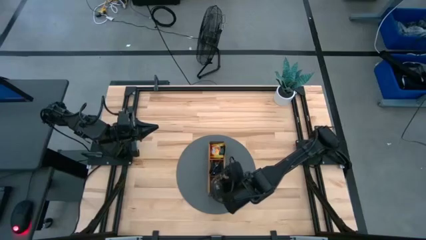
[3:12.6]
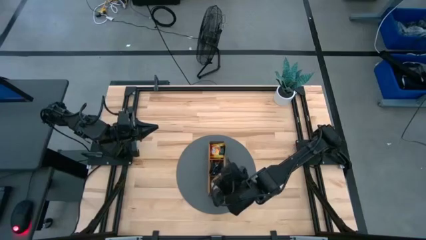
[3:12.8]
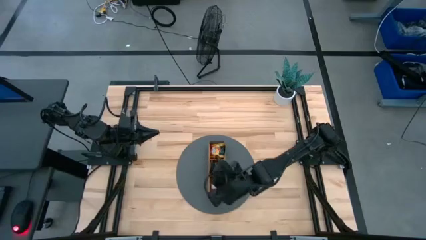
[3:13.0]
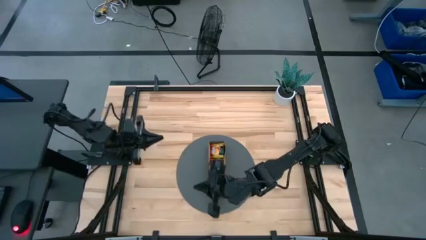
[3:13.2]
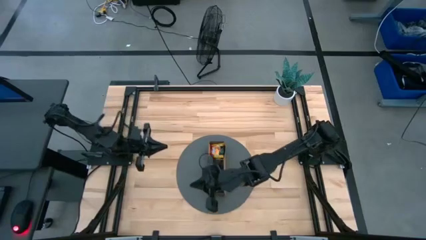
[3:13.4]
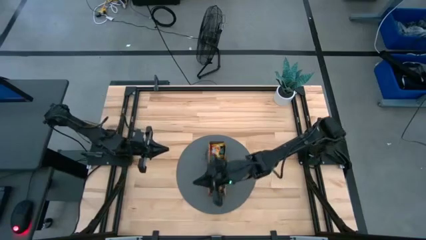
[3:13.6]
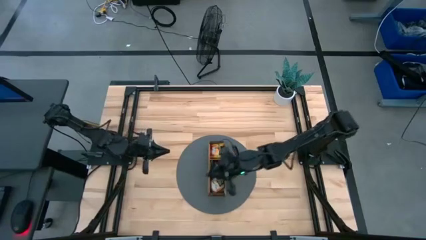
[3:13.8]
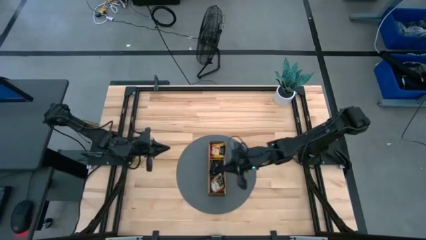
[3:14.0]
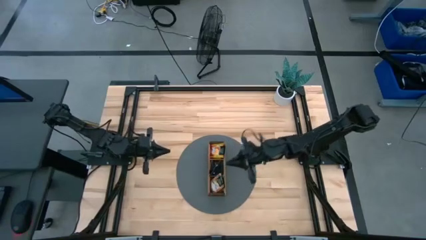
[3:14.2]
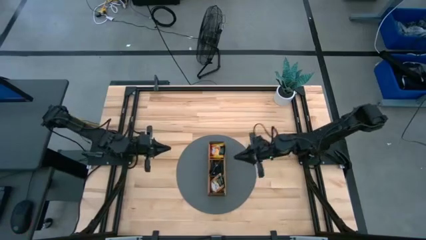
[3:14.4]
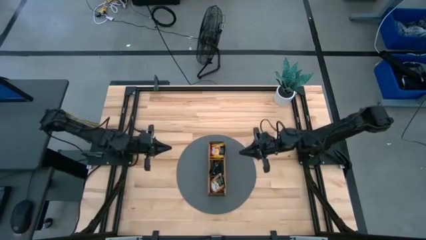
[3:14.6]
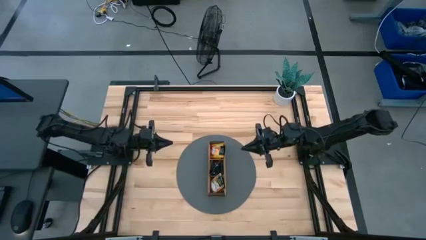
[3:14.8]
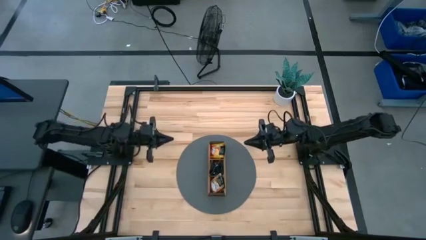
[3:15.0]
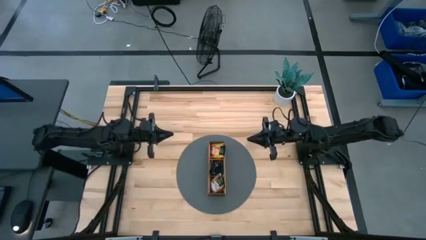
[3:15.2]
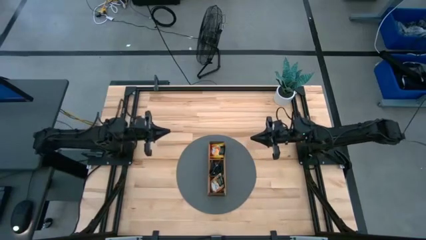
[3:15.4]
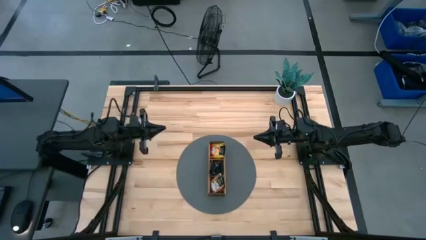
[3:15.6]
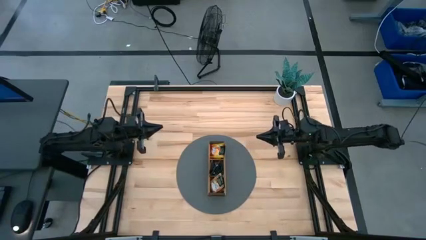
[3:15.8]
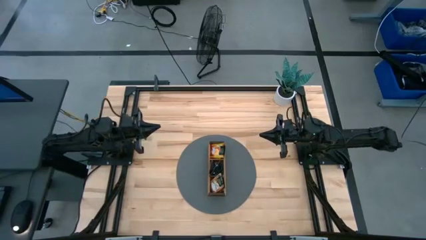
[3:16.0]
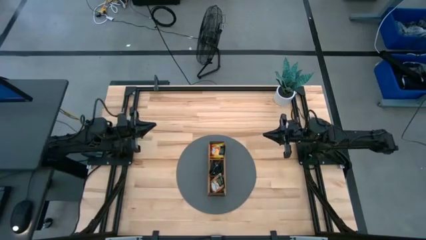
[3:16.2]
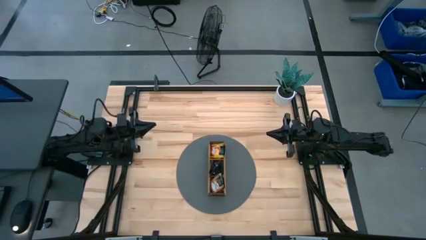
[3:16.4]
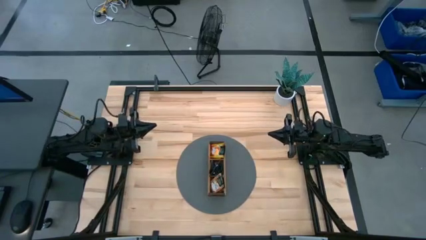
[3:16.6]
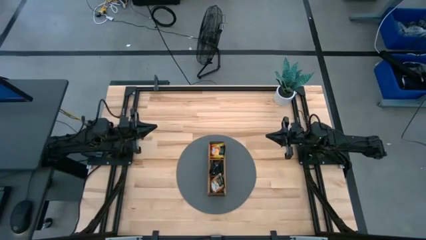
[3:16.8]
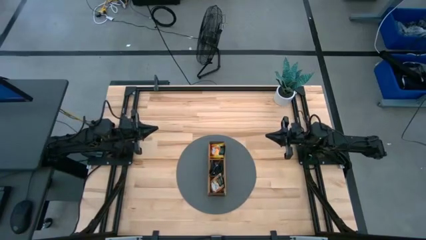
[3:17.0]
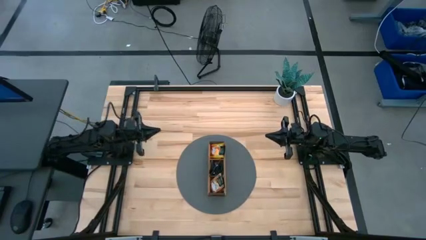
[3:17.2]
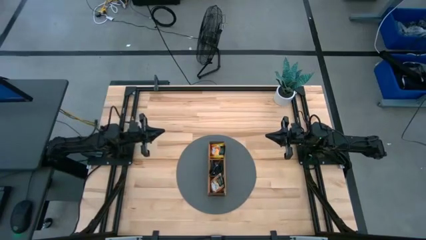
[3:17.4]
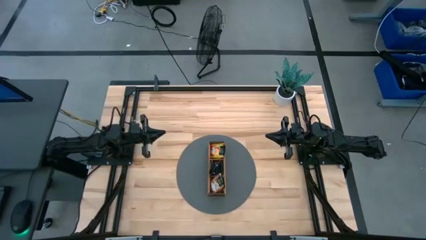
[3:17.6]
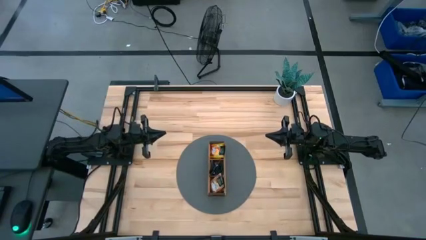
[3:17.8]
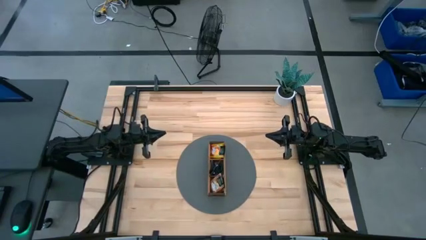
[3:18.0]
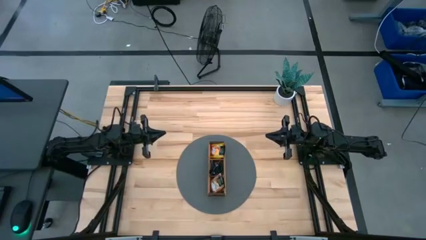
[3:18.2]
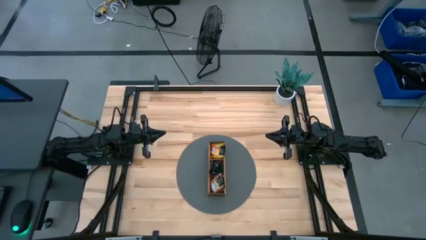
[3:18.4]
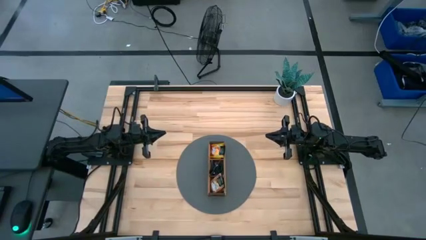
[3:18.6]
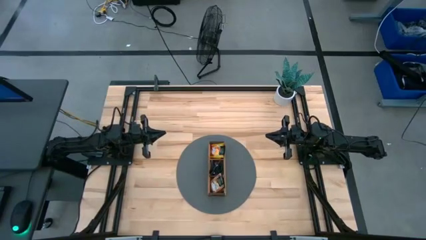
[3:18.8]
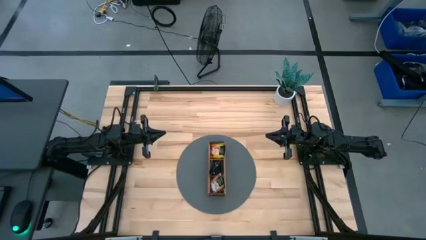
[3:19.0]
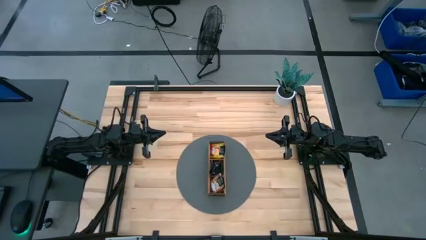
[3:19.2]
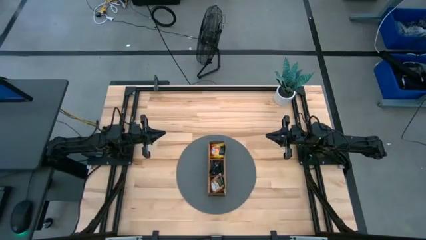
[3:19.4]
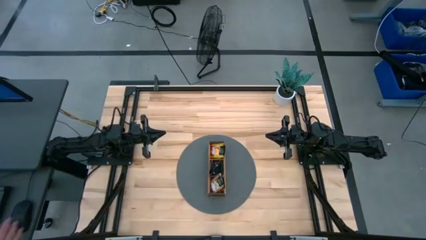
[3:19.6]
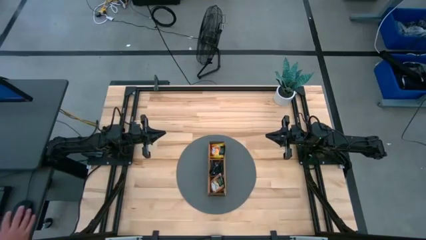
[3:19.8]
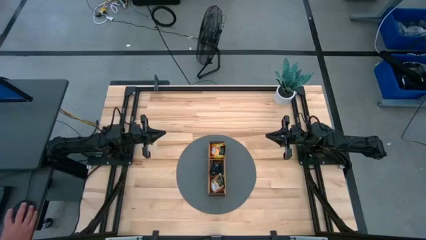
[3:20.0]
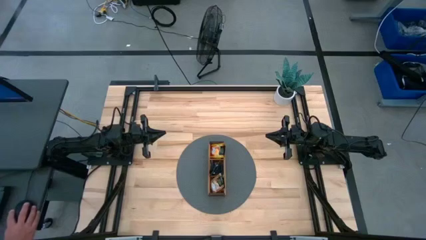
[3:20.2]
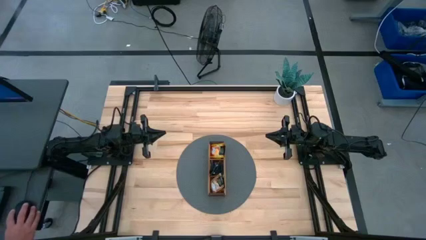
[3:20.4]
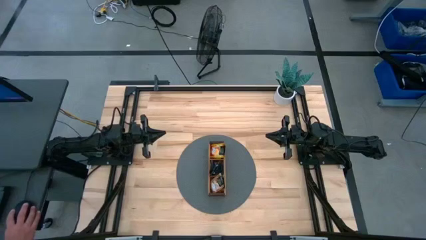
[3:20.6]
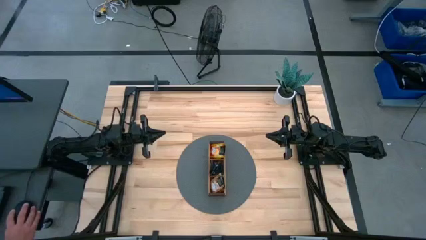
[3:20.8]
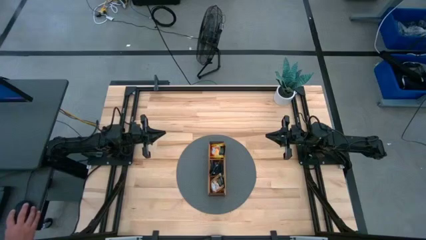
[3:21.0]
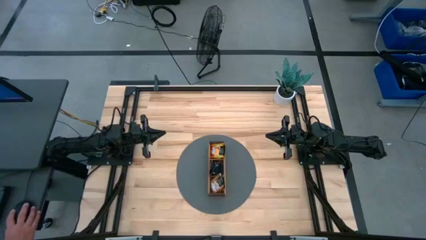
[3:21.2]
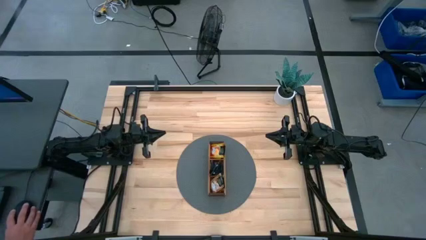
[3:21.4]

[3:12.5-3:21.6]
Task: Pick & Place Tea
Return to Home Position

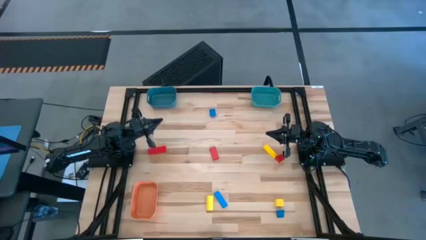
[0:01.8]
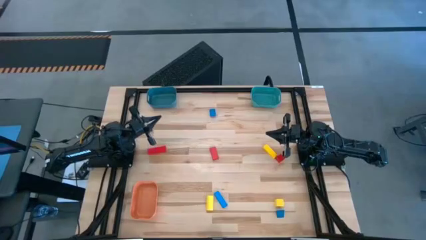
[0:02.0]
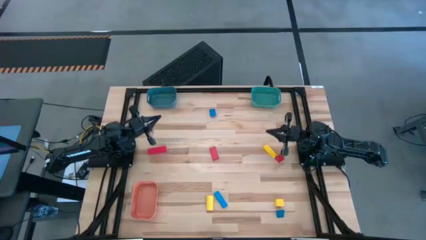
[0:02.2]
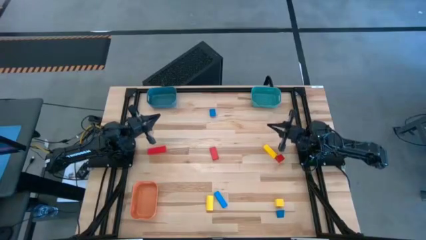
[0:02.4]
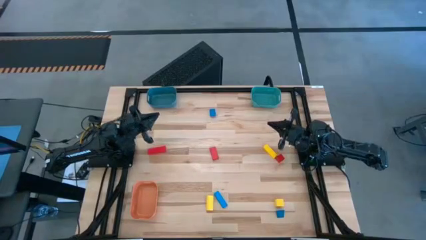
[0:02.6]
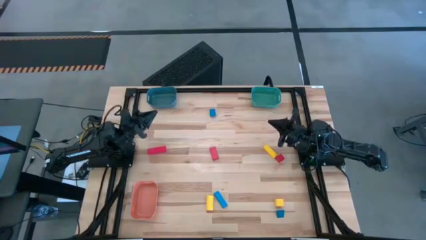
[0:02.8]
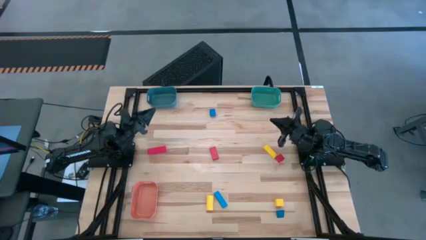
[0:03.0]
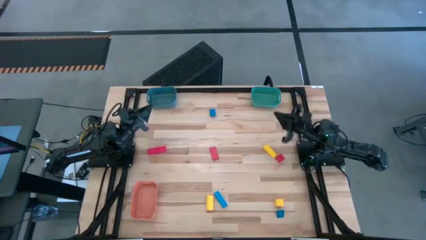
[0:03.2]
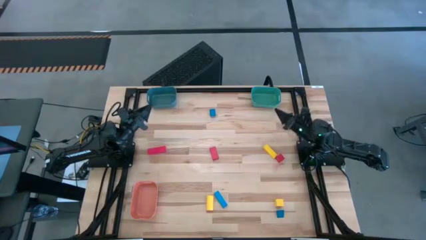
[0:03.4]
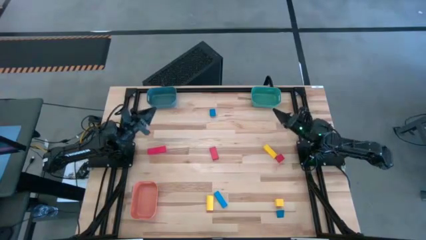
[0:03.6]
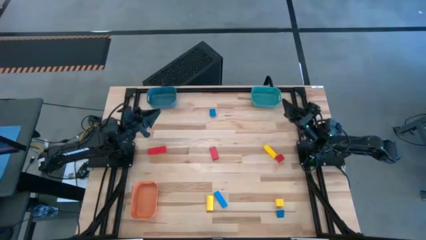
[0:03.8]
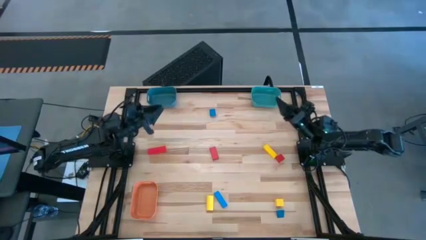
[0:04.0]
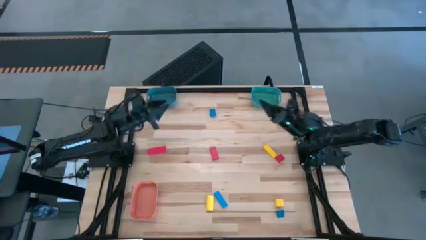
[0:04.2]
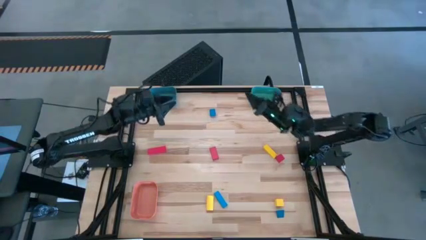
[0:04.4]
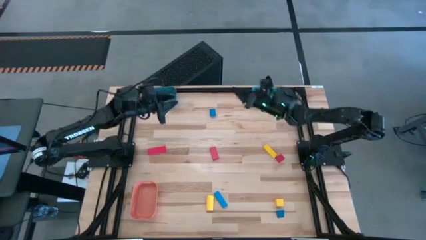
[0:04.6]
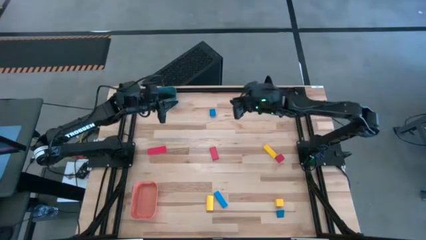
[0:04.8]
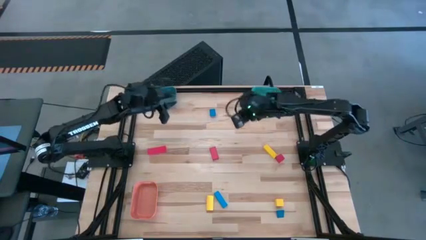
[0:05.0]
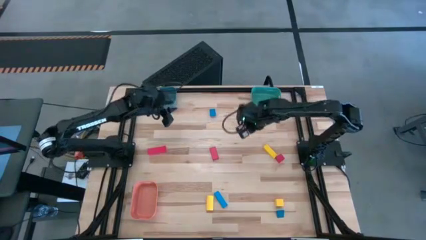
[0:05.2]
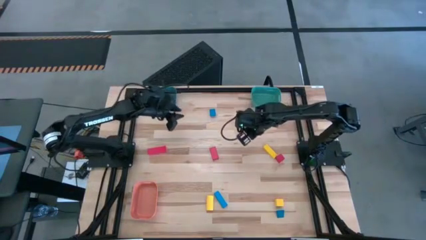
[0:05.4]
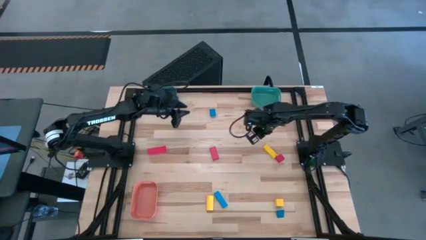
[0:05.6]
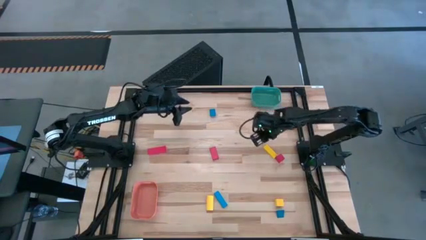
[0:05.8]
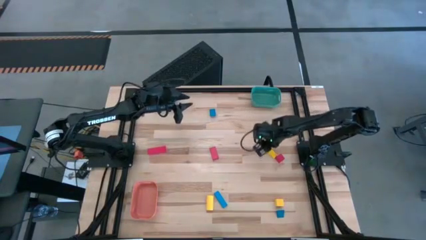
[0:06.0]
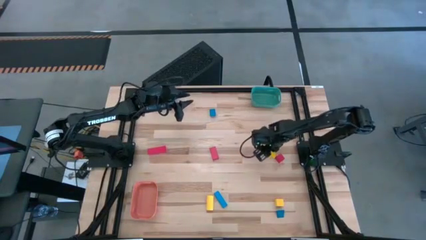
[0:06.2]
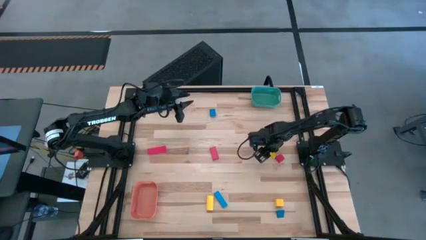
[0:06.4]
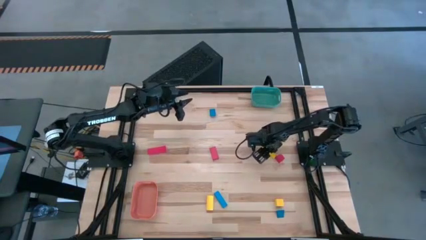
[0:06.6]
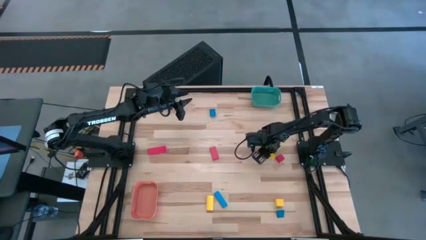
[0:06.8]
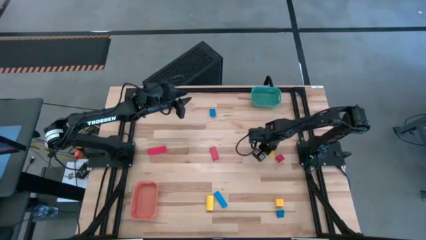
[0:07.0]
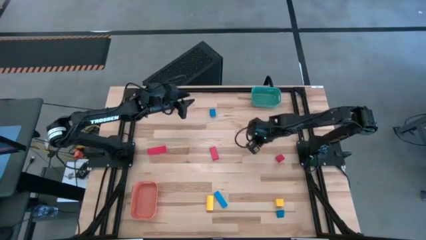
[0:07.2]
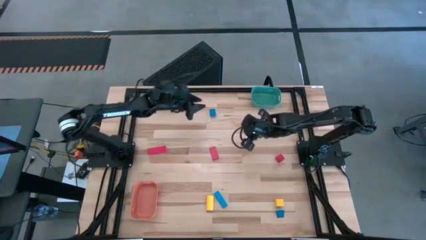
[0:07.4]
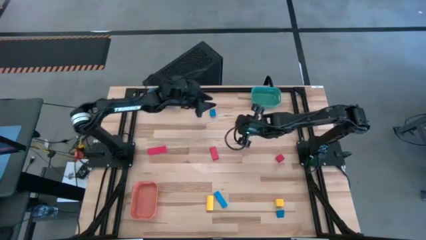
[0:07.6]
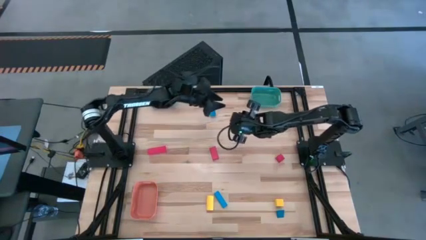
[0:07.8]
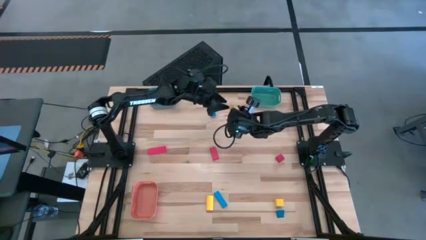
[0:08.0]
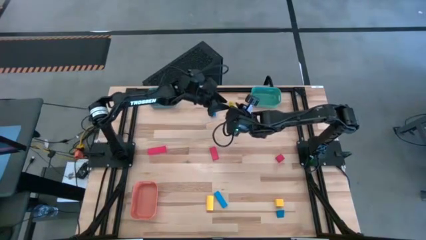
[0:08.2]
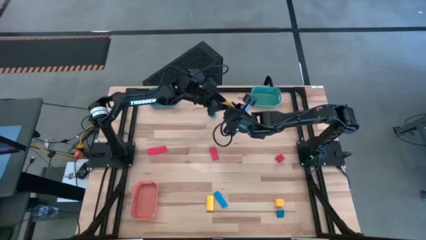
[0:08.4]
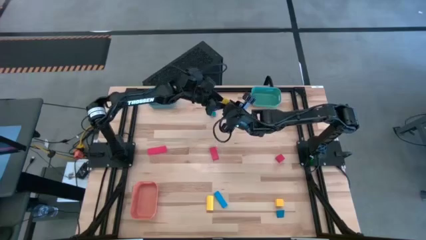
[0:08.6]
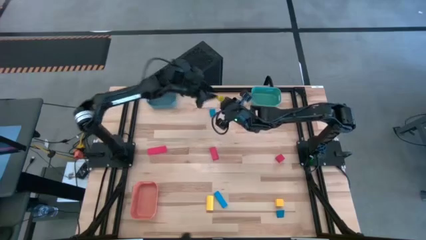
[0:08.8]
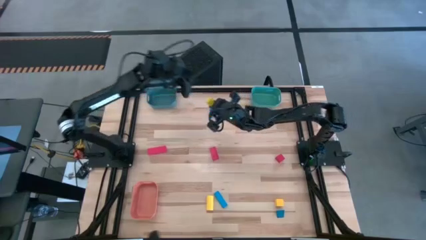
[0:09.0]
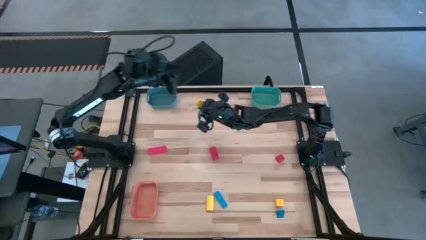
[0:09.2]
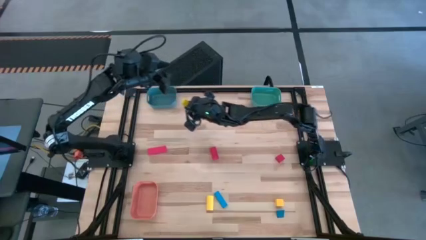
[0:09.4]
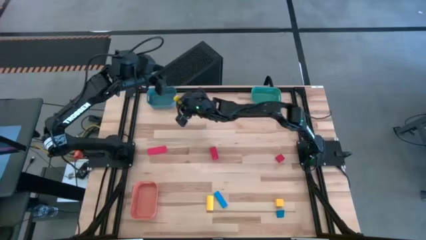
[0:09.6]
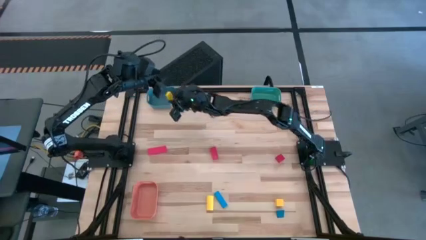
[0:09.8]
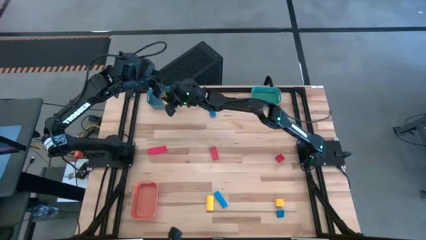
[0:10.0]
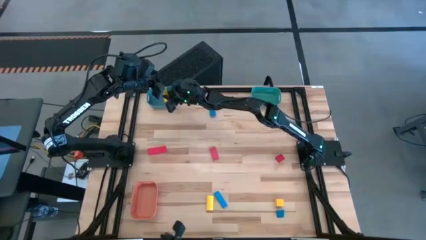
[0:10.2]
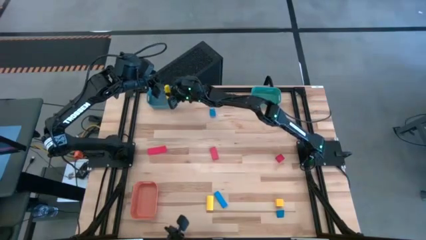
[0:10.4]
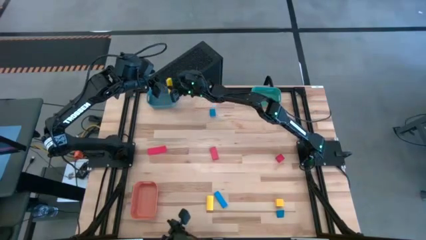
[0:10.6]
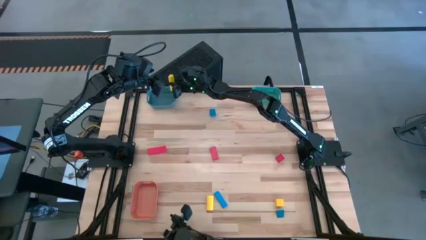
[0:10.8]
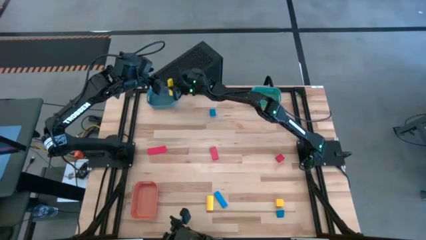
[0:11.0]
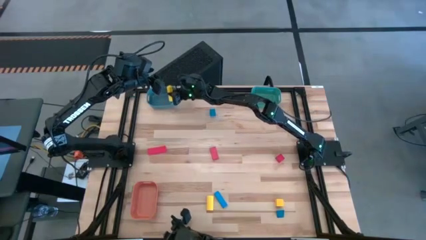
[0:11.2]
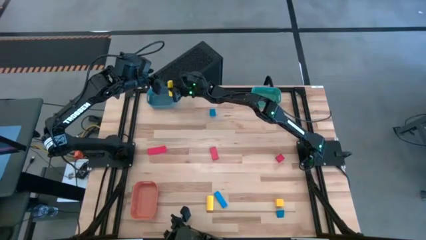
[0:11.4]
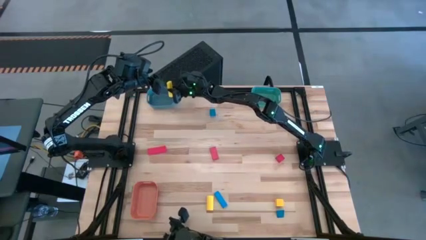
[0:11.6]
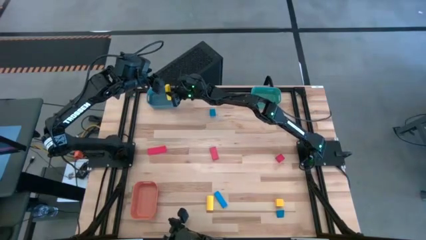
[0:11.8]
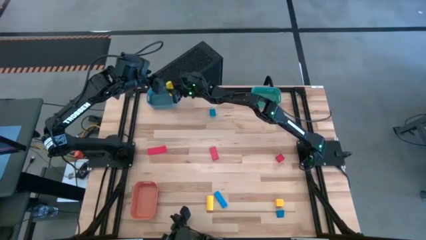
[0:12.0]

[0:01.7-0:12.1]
Task: Sort & place blocks by color
Put the top yellow block into the blue bin
